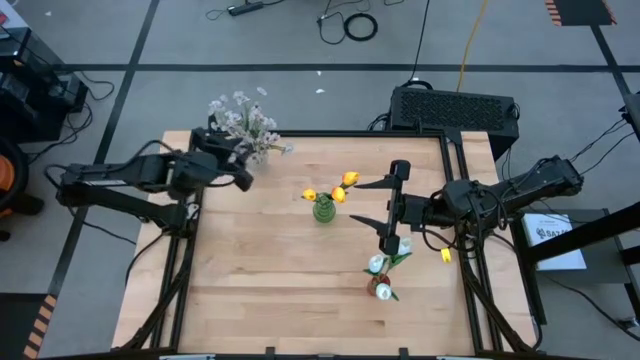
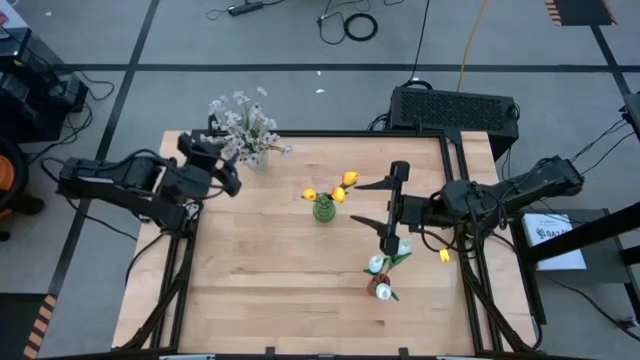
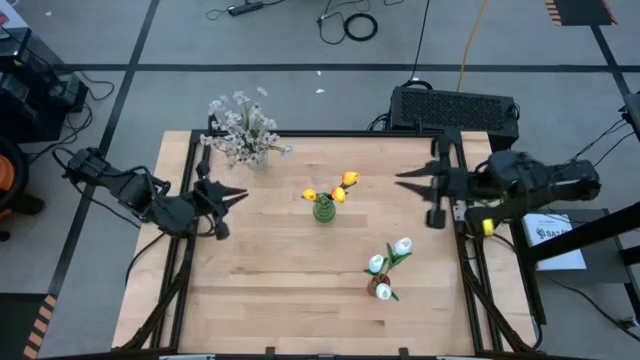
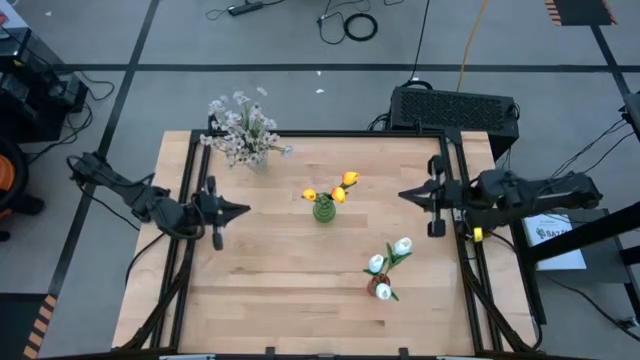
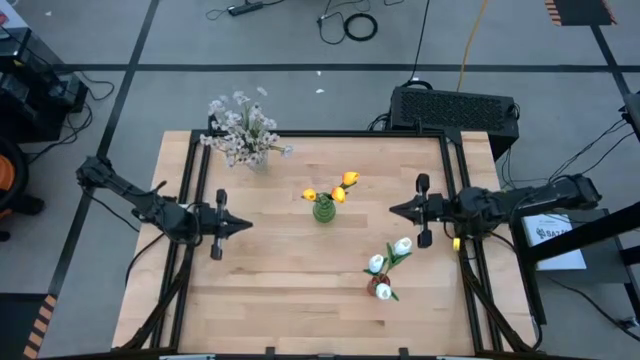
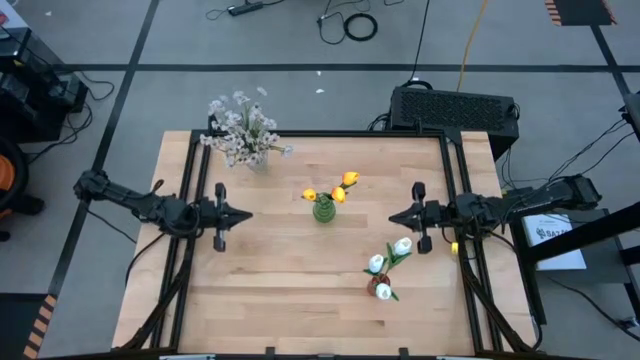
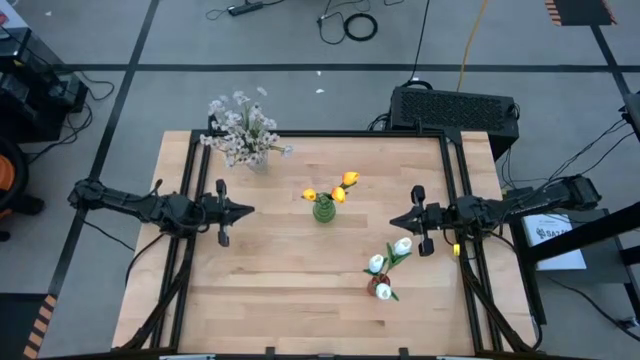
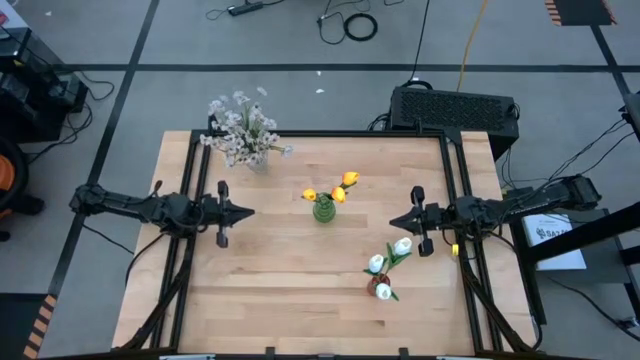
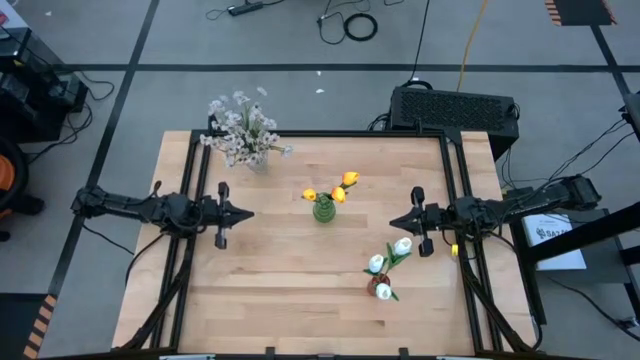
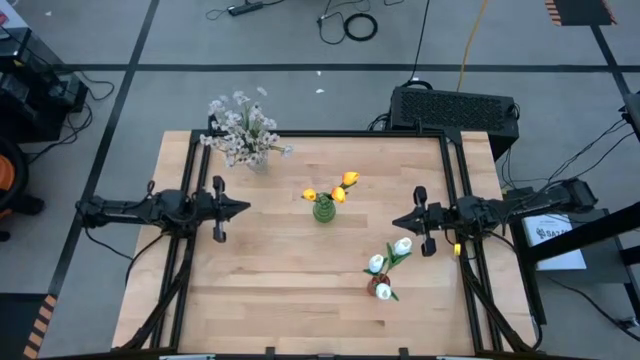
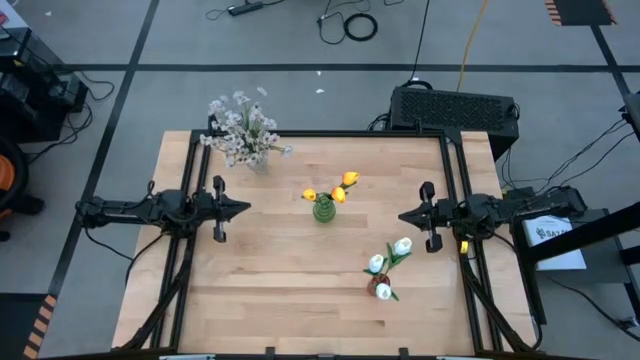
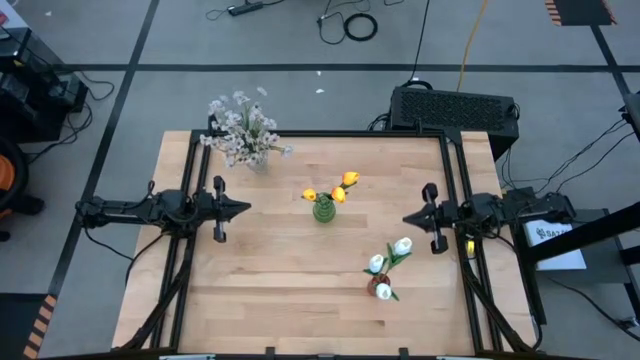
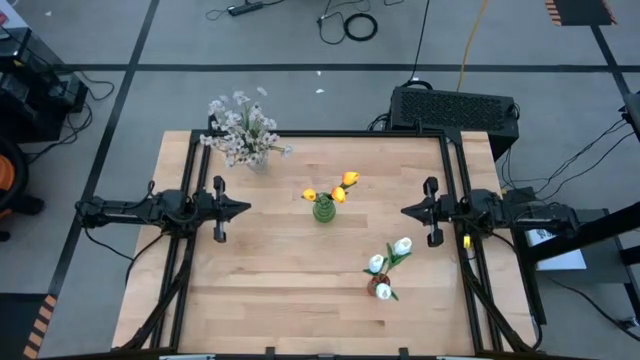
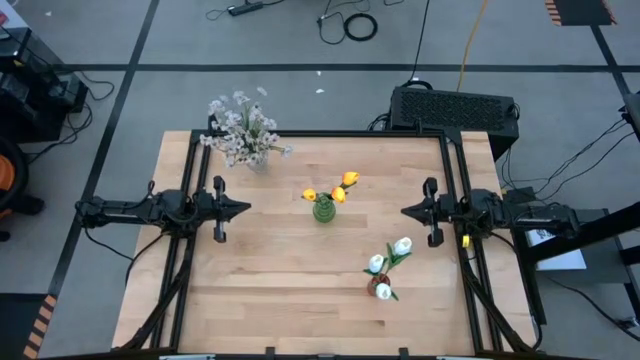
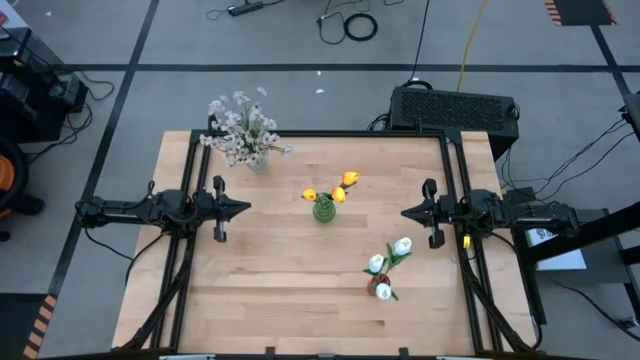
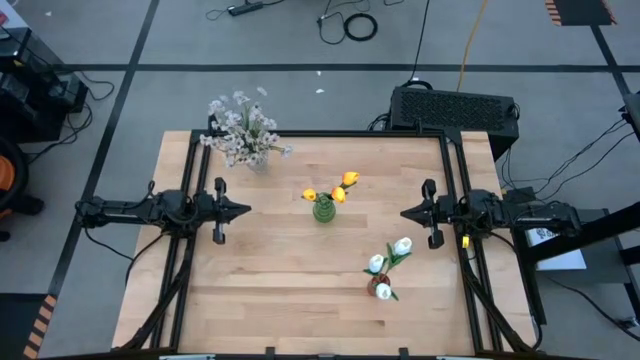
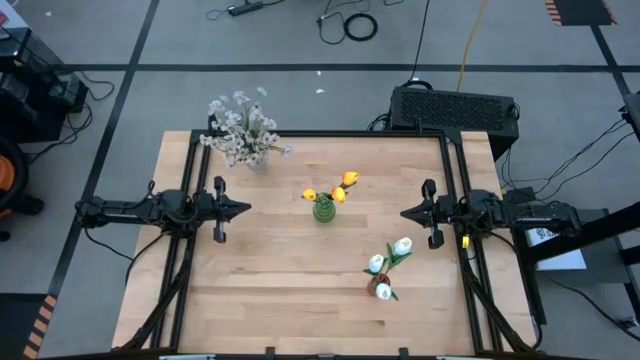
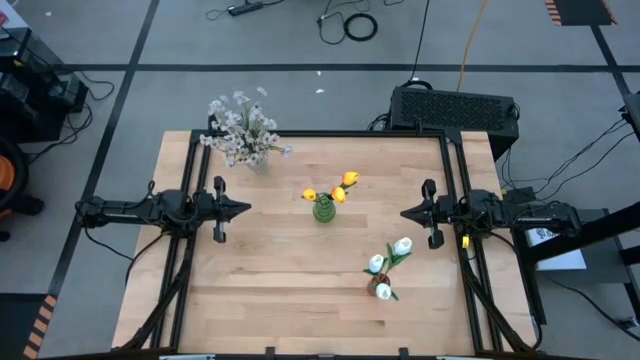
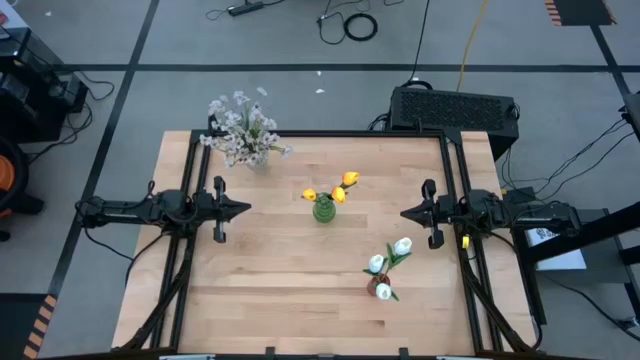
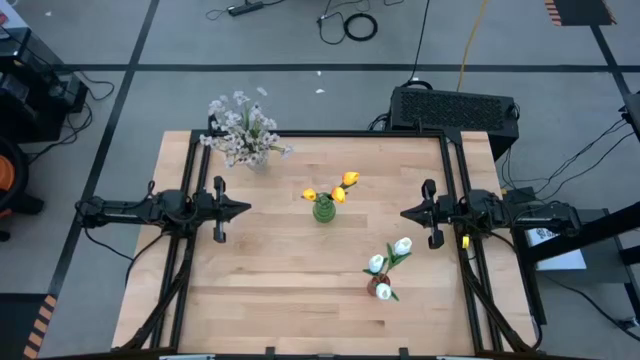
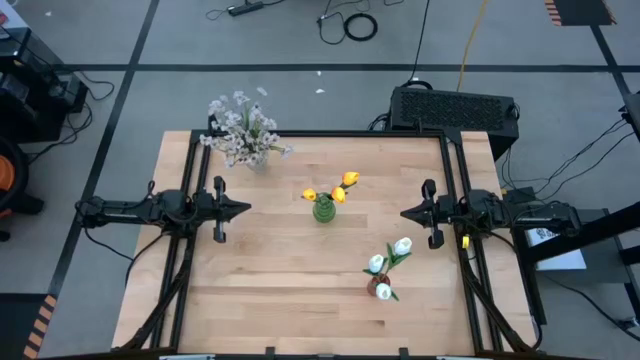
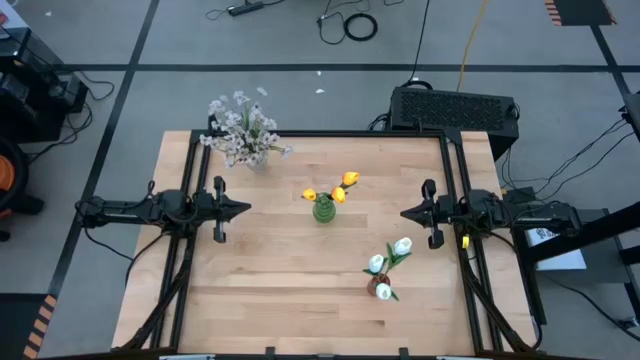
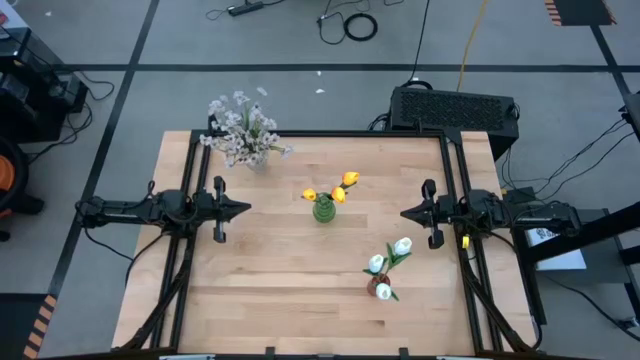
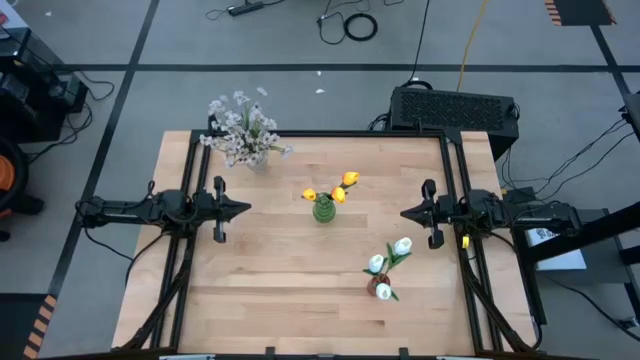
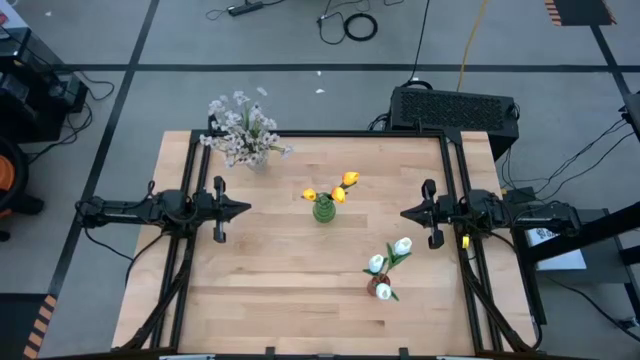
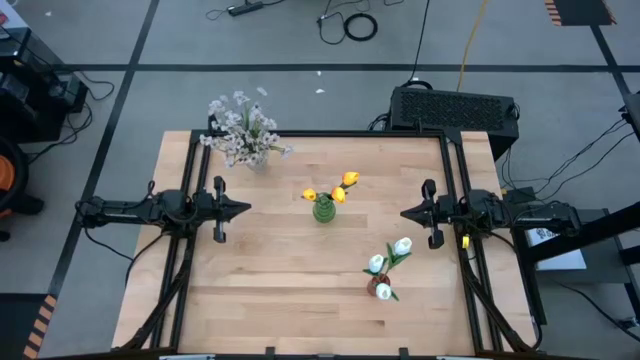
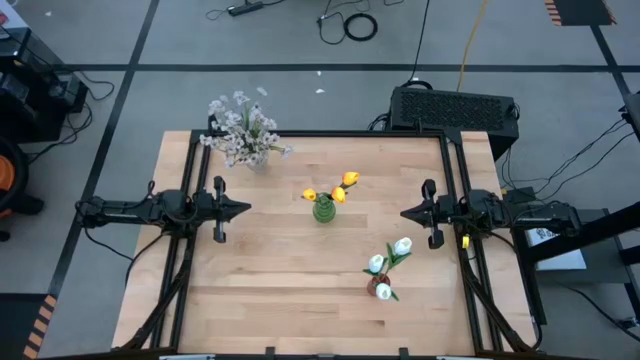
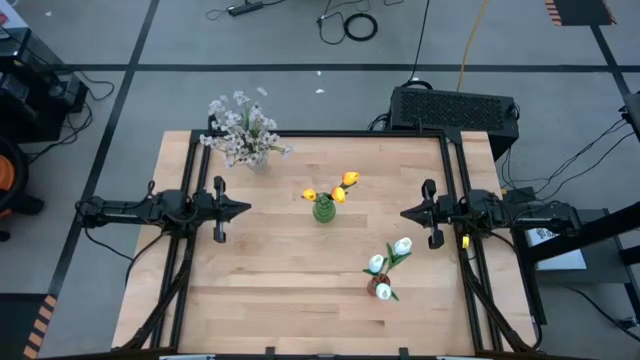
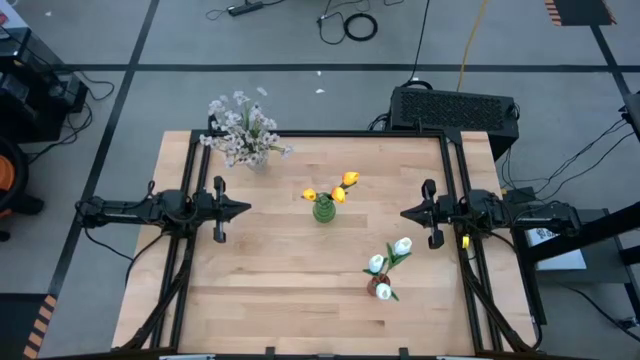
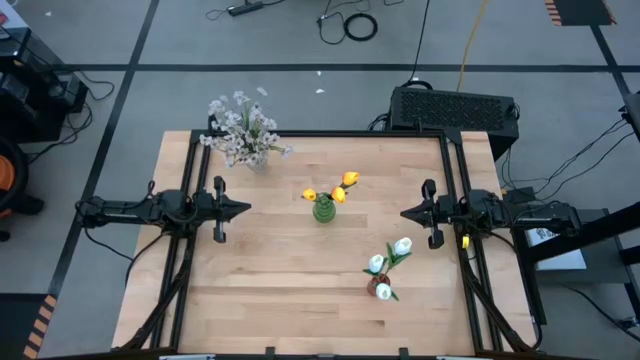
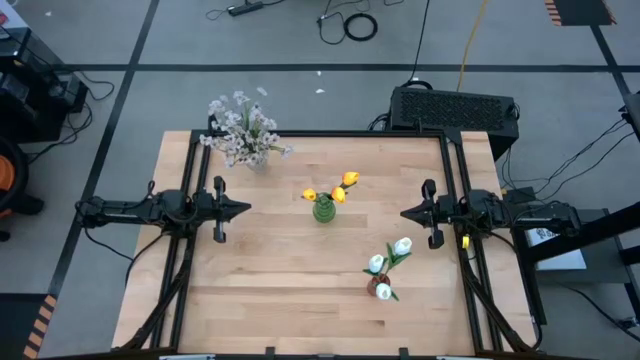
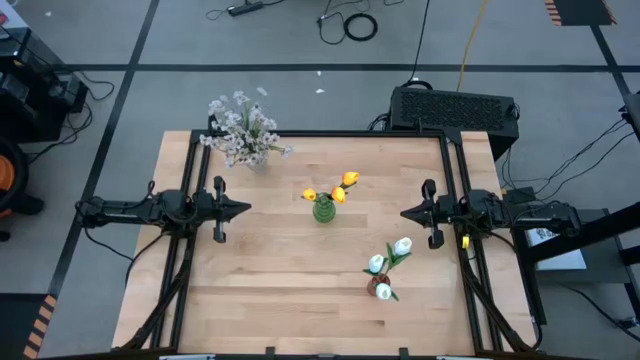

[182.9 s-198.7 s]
Task: Sort flowers into vase by color
Return to Home Position

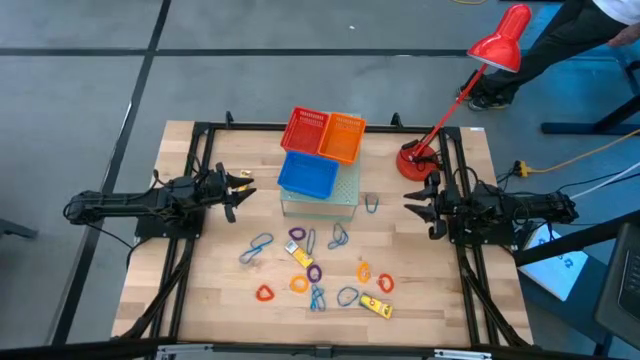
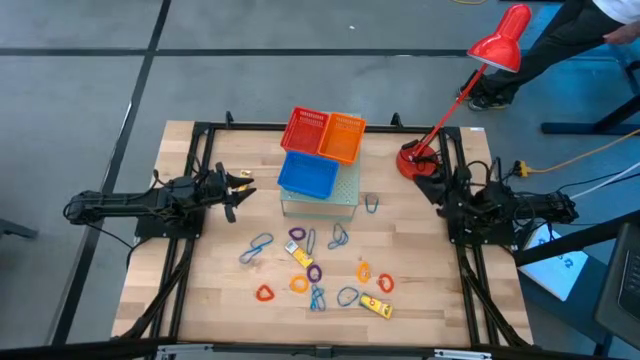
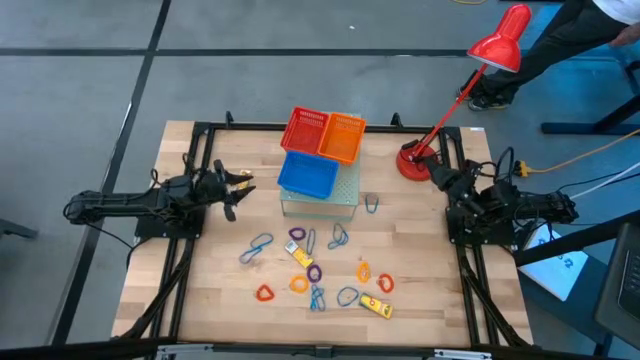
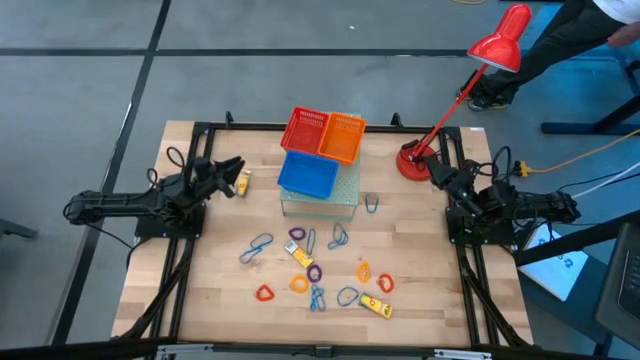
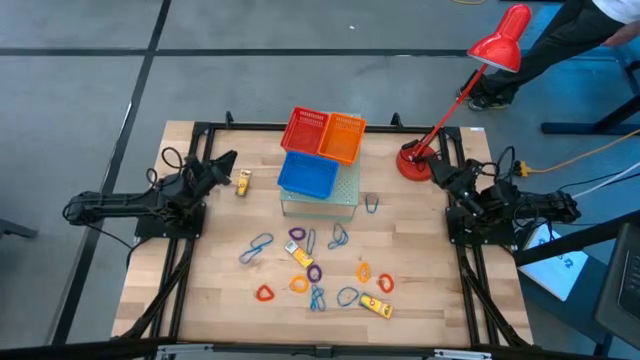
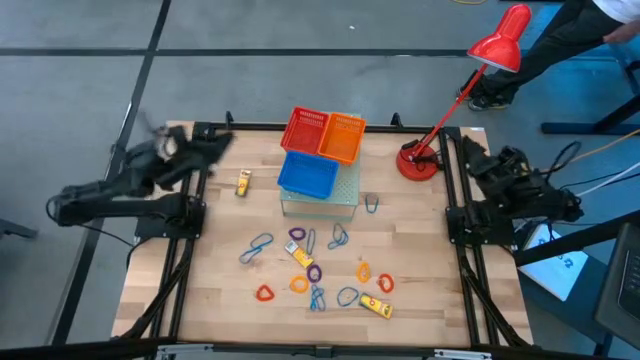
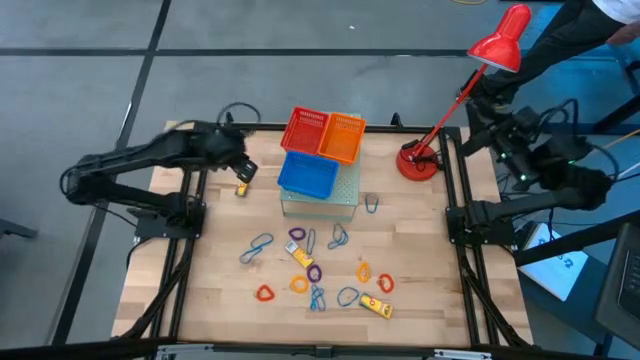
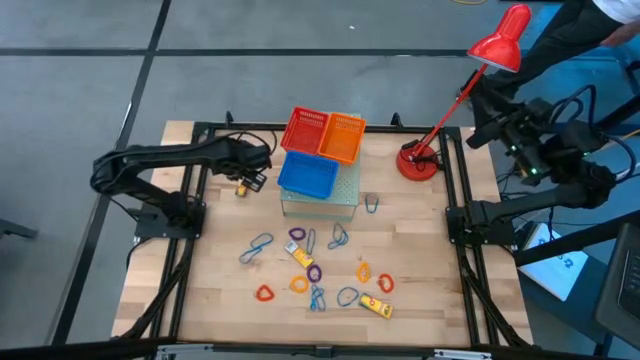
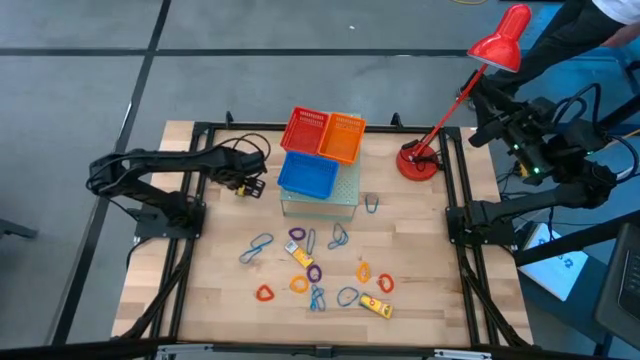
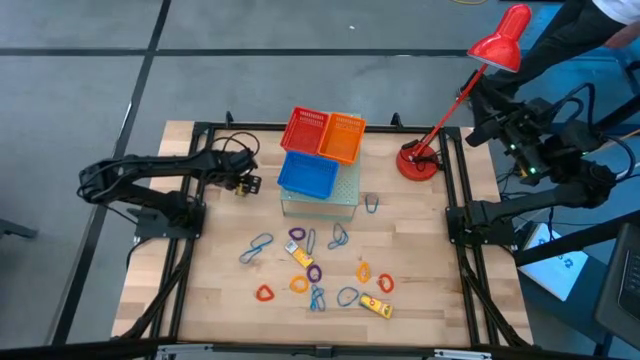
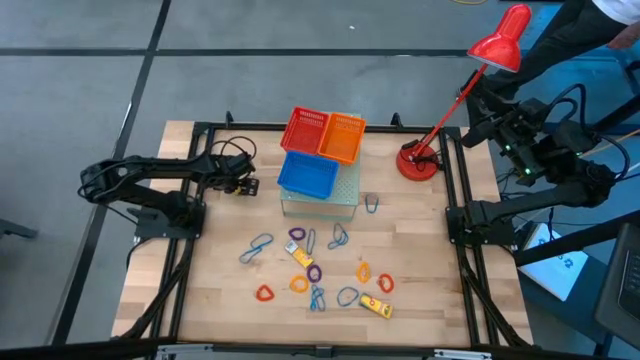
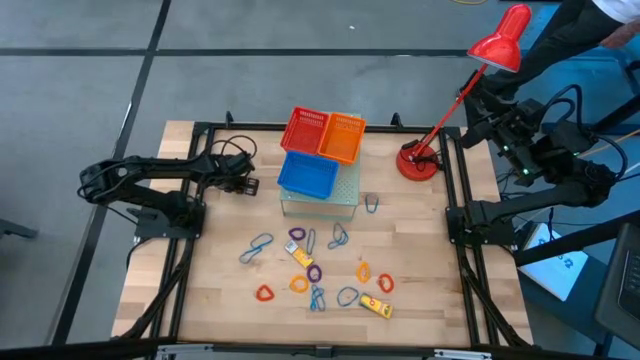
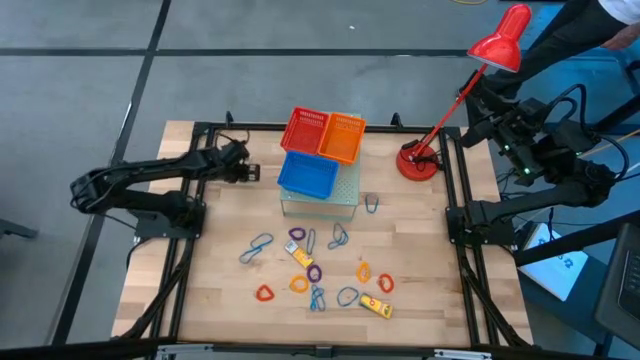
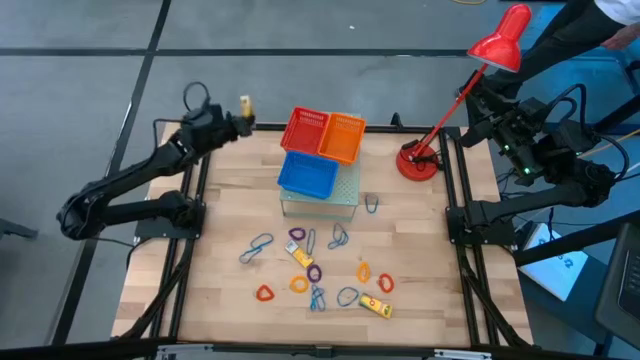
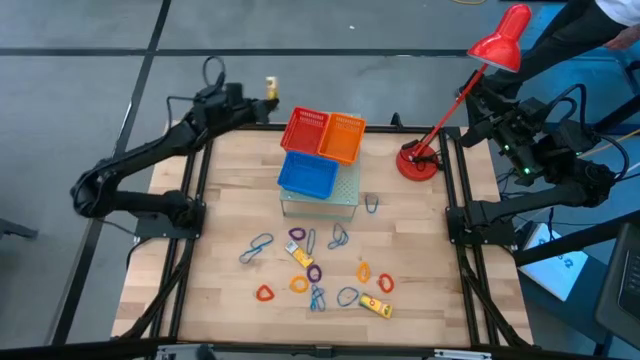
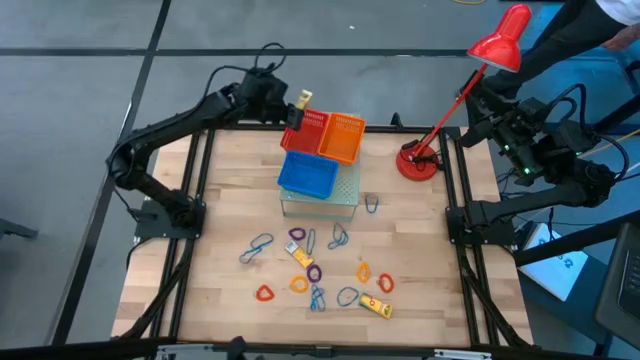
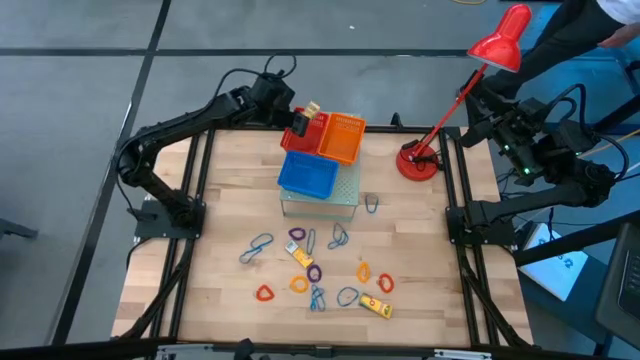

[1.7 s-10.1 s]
Task: Pick & Place Office Desk Supplies
Put the crayon box into the red basket on the shelf
